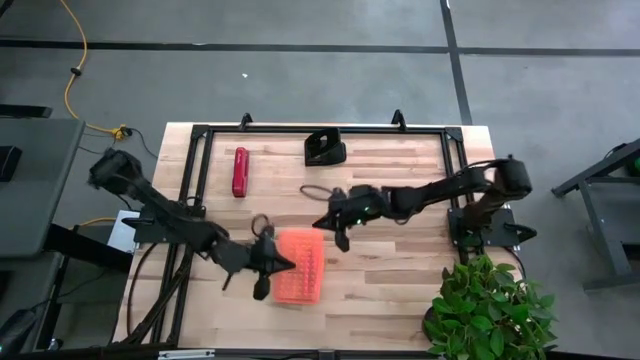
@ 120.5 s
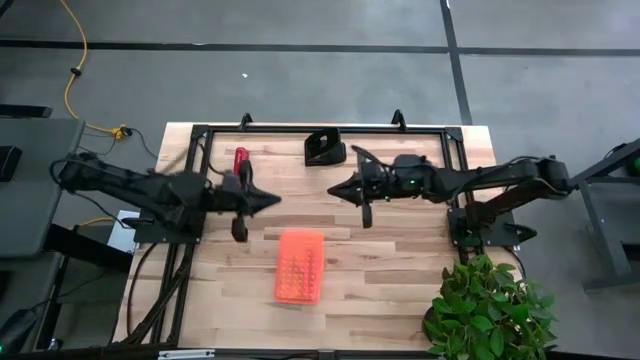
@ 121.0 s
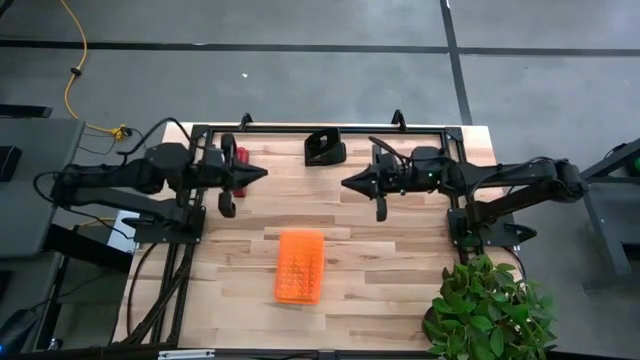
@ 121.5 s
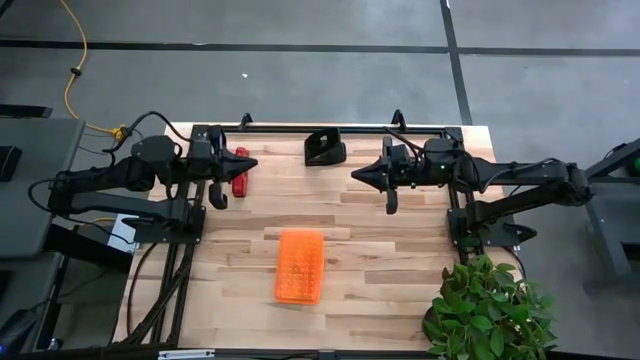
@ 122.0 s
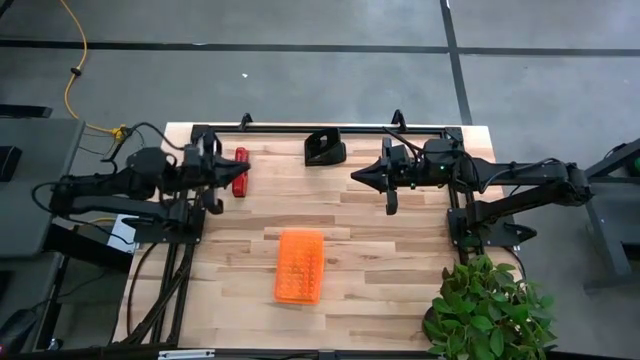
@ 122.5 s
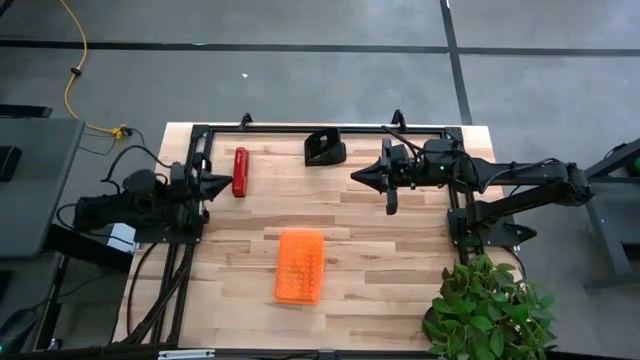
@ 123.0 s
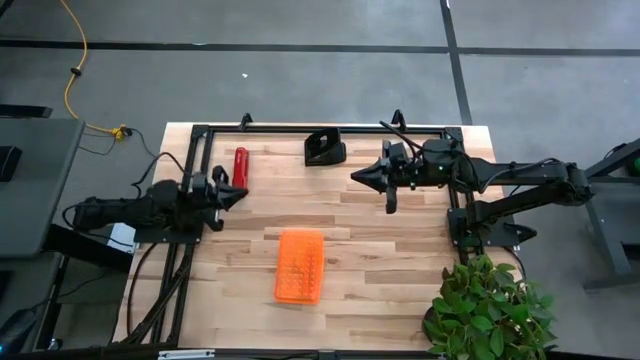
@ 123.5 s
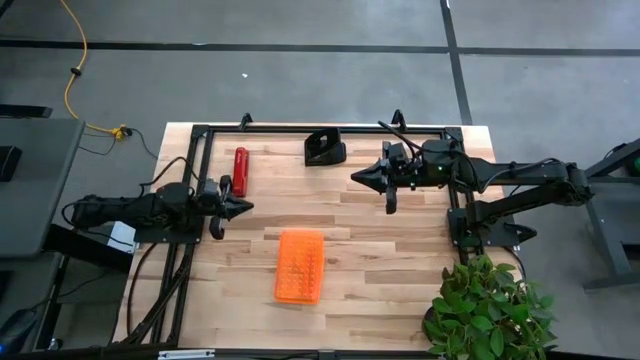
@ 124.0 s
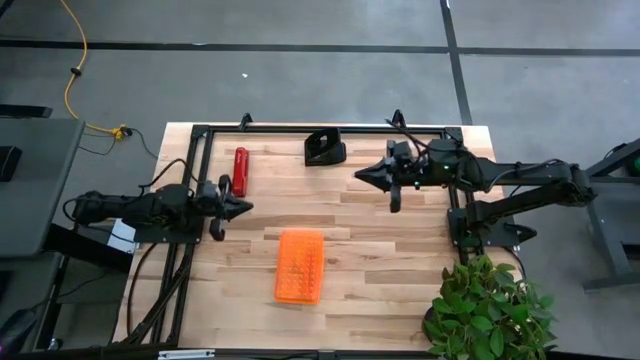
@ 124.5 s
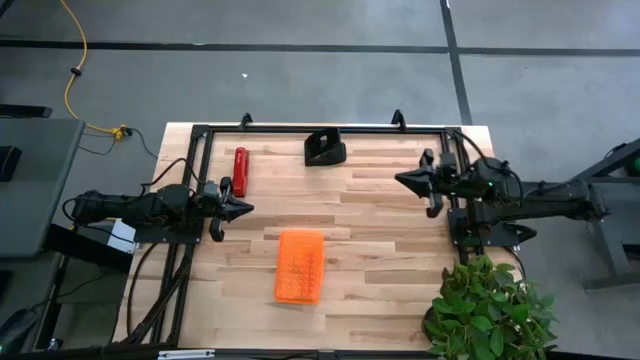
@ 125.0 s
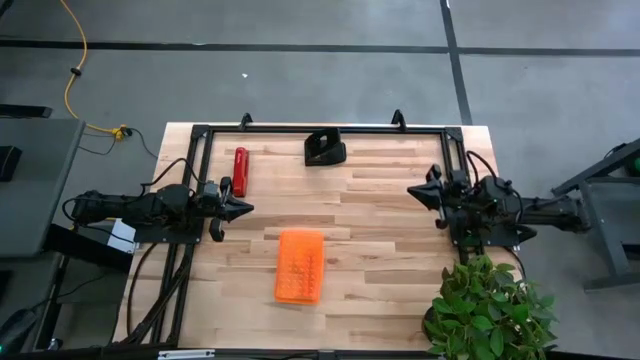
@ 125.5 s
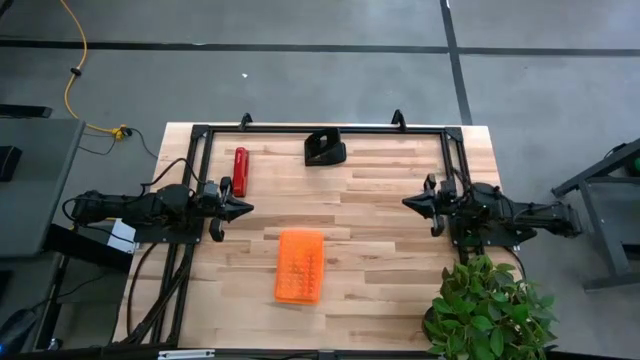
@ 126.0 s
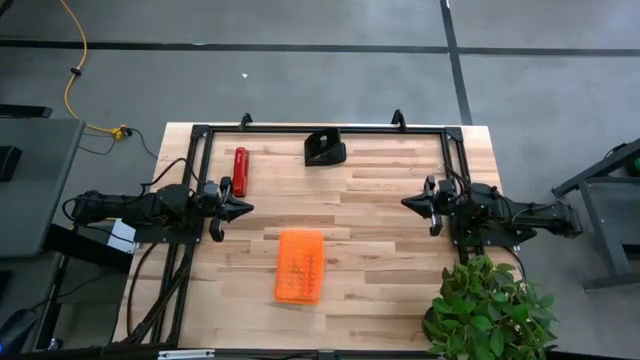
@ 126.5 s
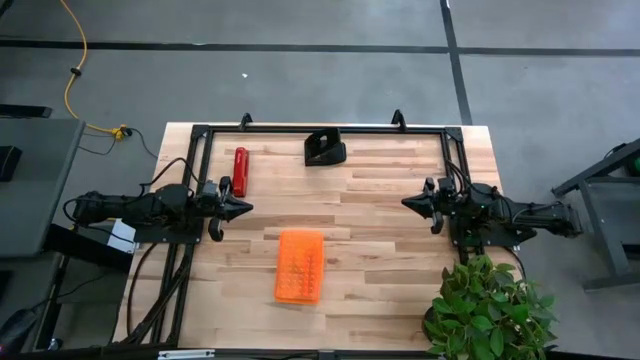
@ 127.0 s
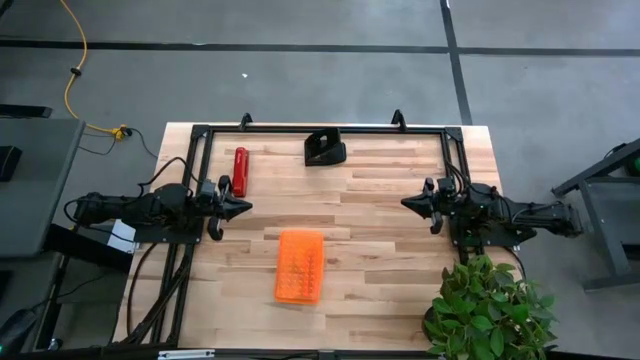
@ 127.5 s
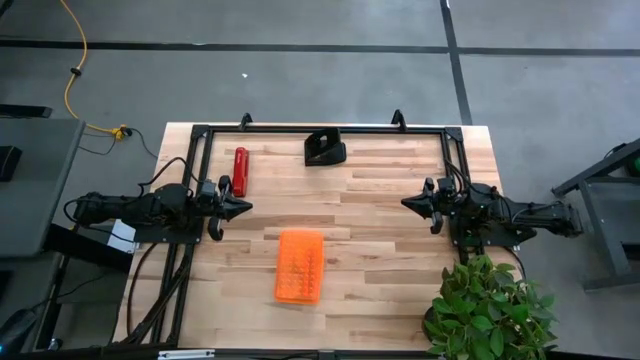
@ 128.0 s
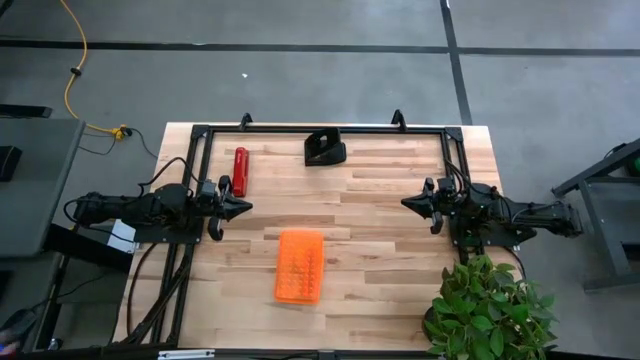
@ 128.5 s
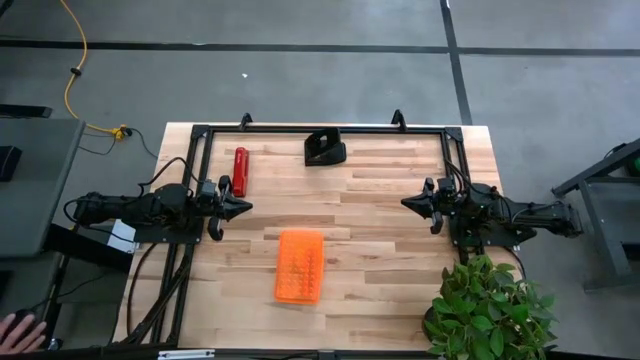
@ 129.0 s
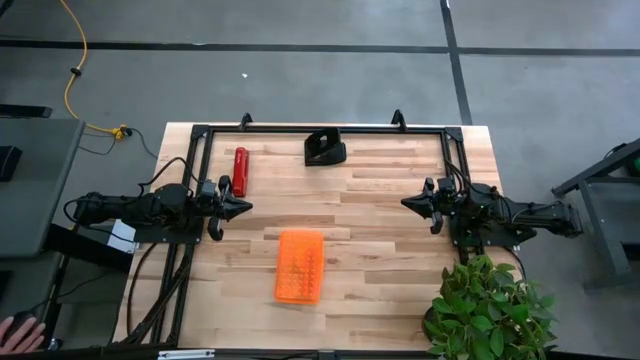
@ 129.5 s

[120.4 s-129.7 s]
Task: Pack school essentials
Return to Home Position

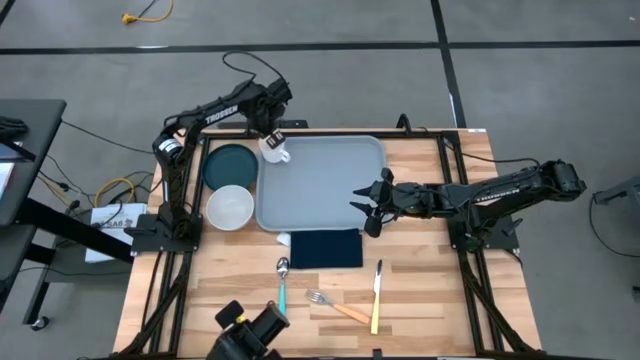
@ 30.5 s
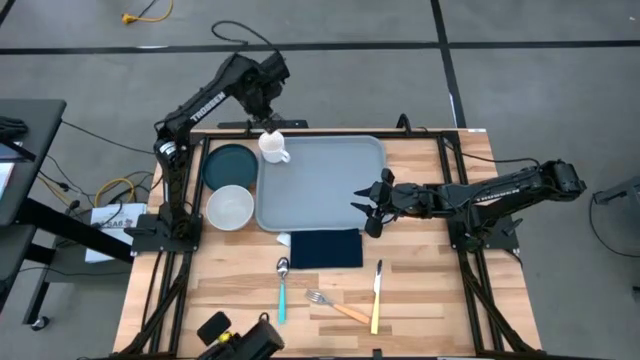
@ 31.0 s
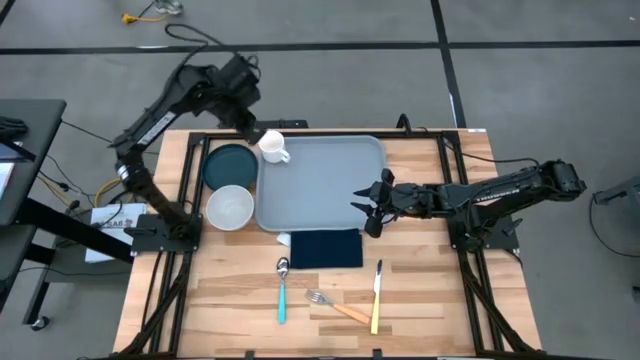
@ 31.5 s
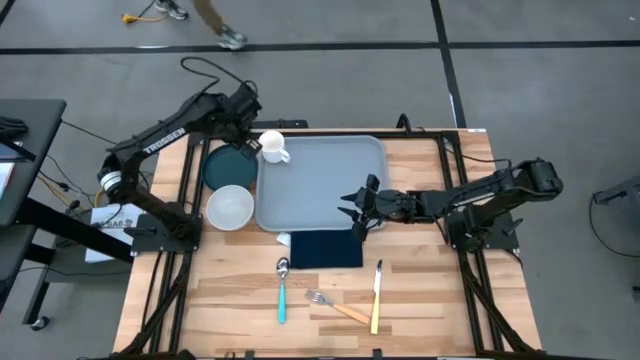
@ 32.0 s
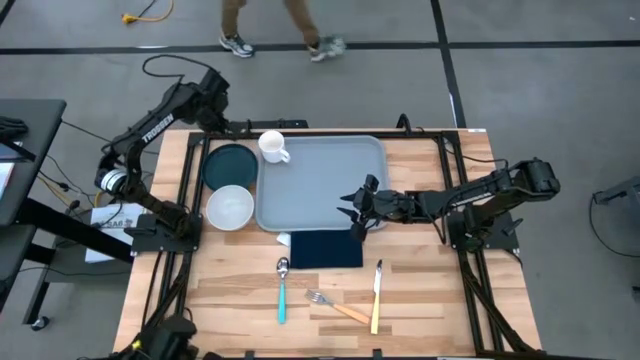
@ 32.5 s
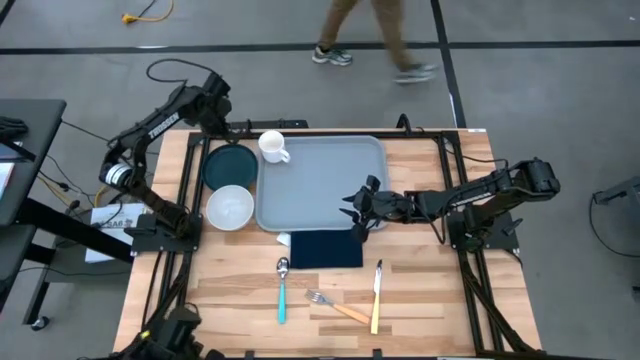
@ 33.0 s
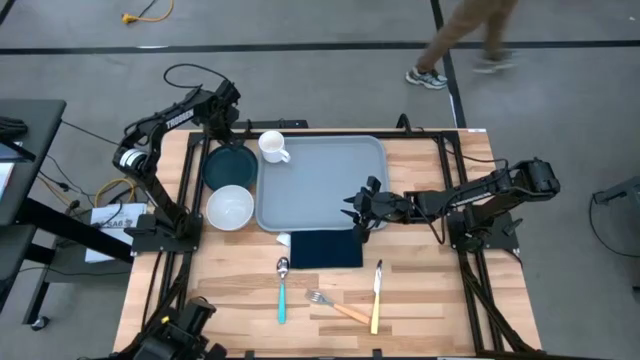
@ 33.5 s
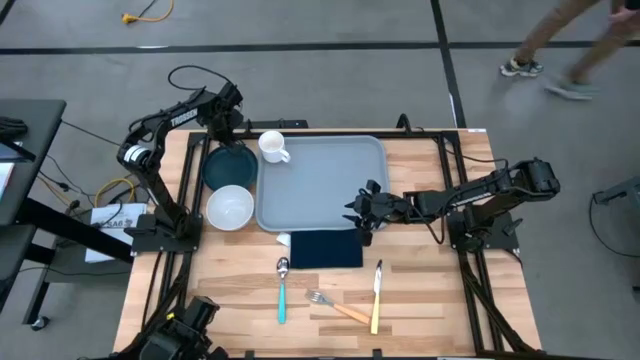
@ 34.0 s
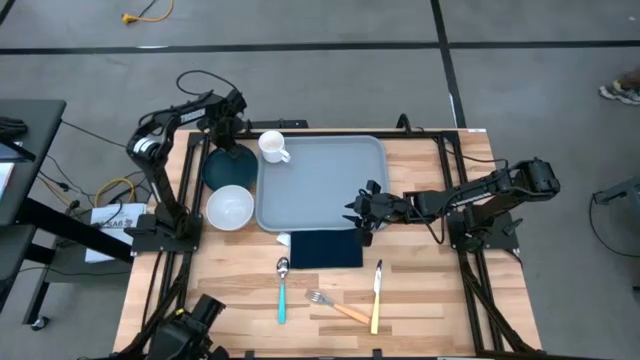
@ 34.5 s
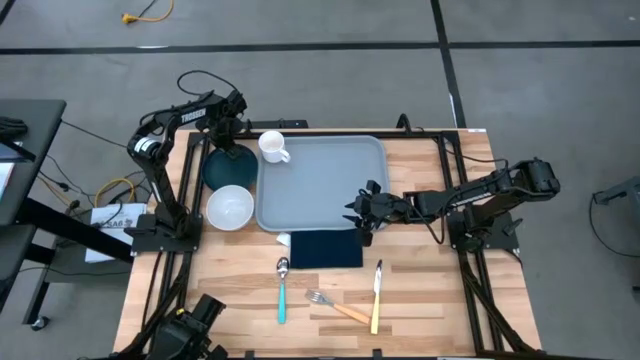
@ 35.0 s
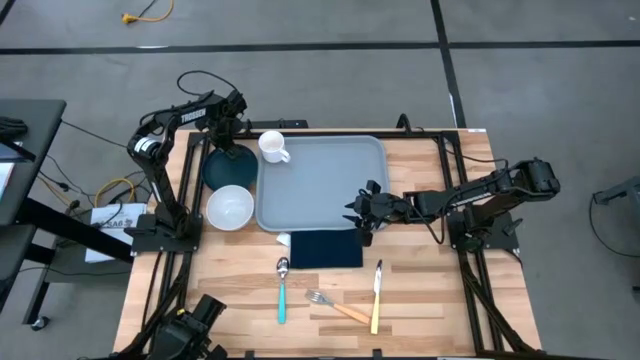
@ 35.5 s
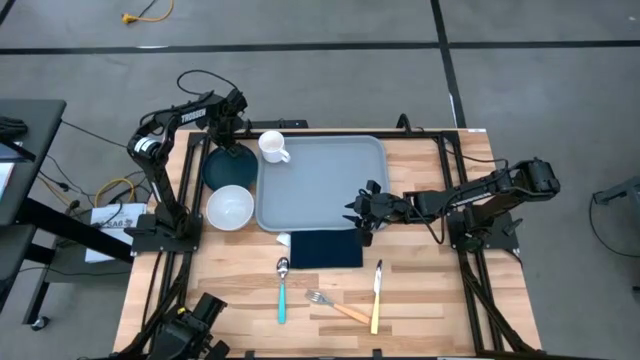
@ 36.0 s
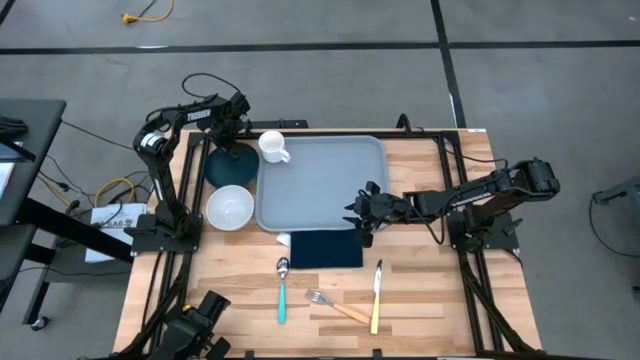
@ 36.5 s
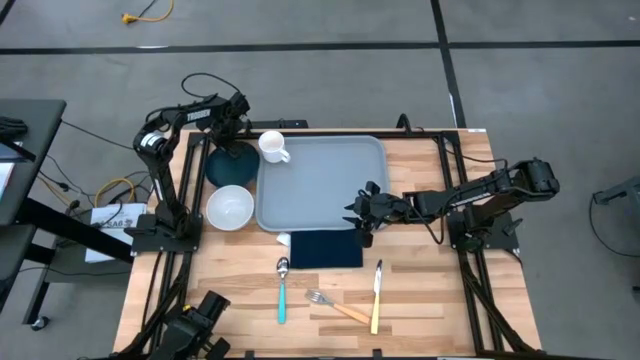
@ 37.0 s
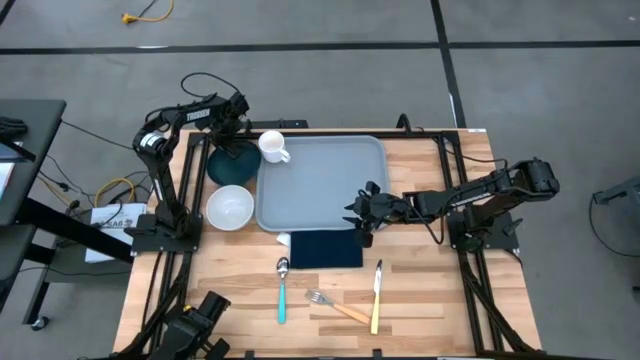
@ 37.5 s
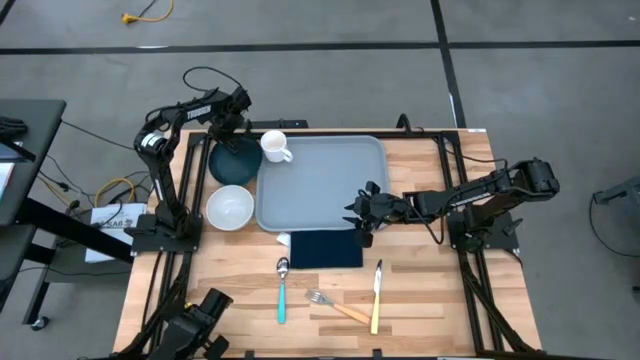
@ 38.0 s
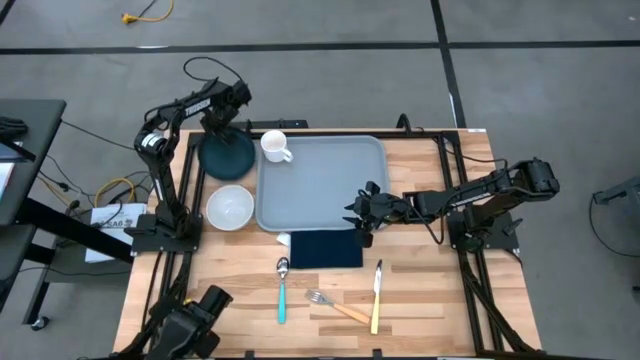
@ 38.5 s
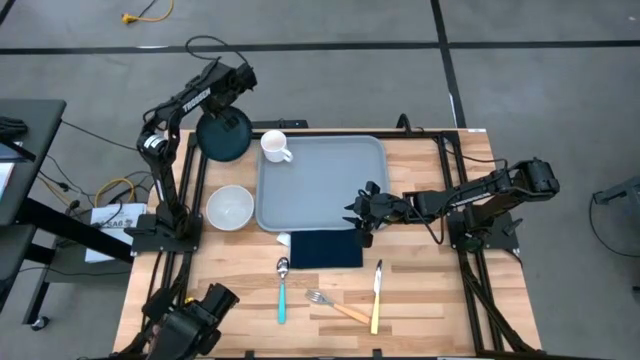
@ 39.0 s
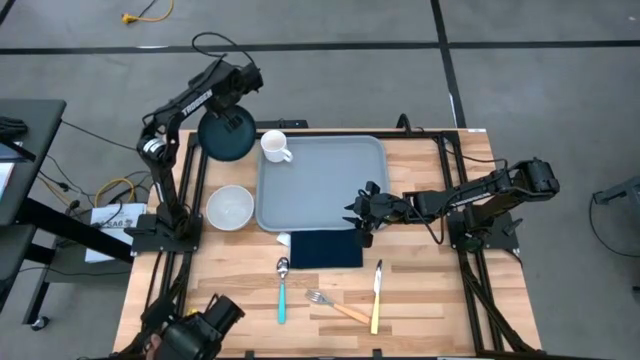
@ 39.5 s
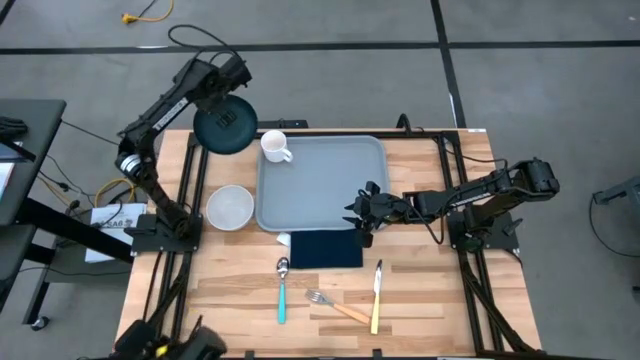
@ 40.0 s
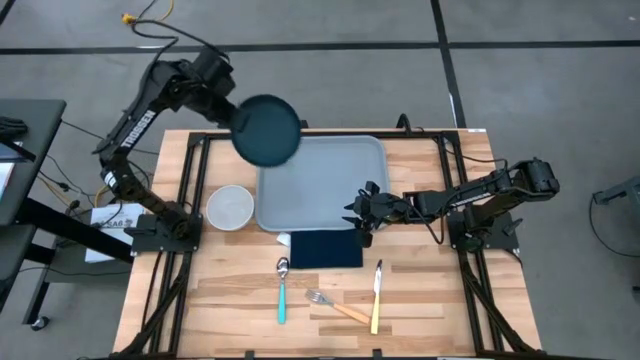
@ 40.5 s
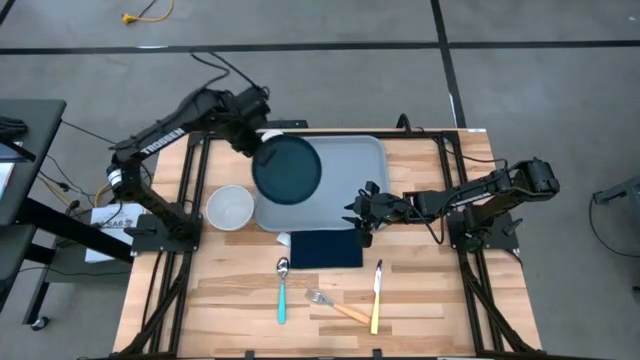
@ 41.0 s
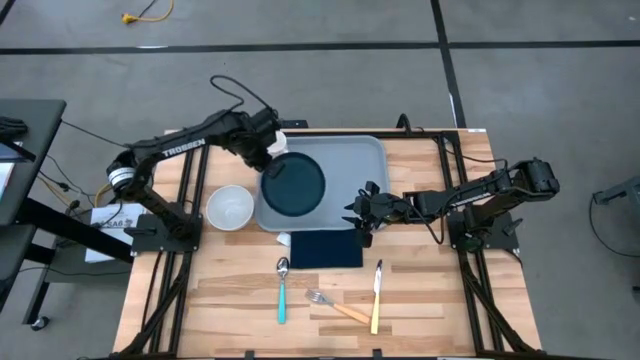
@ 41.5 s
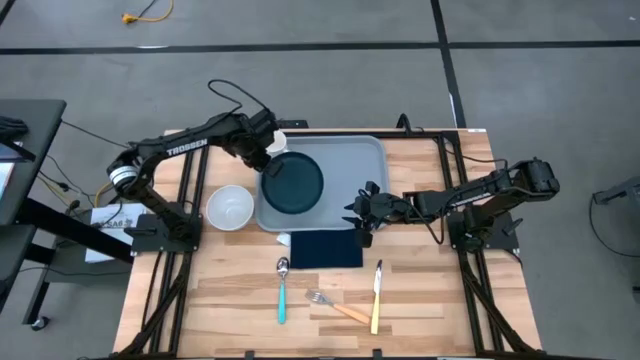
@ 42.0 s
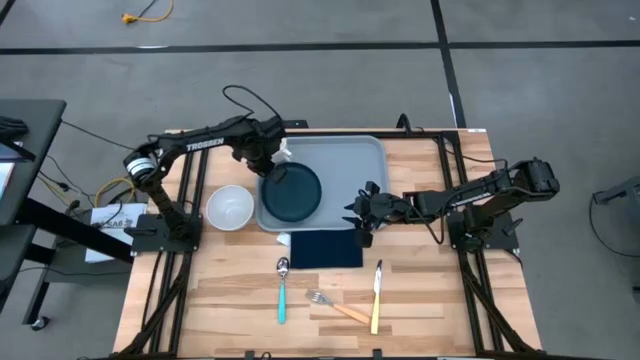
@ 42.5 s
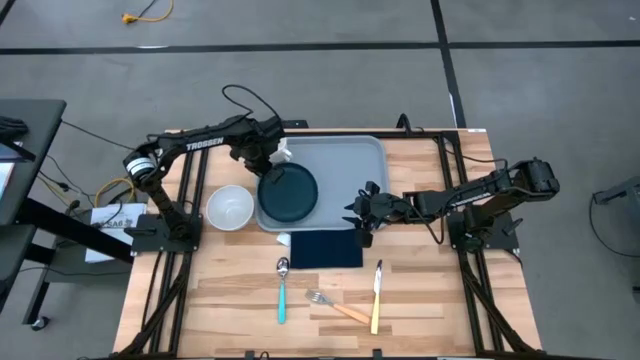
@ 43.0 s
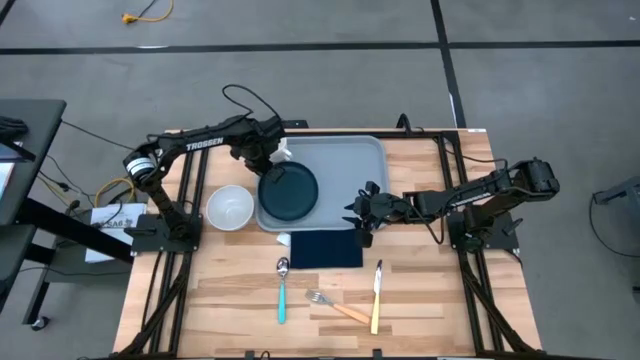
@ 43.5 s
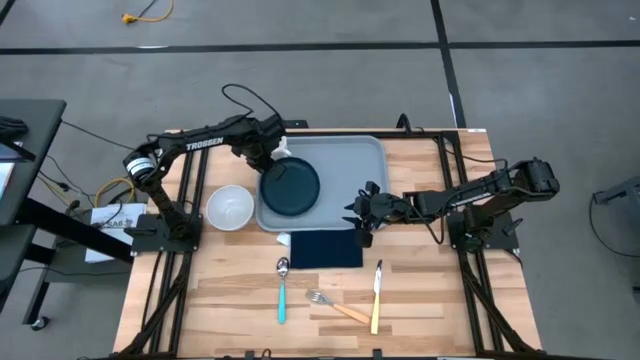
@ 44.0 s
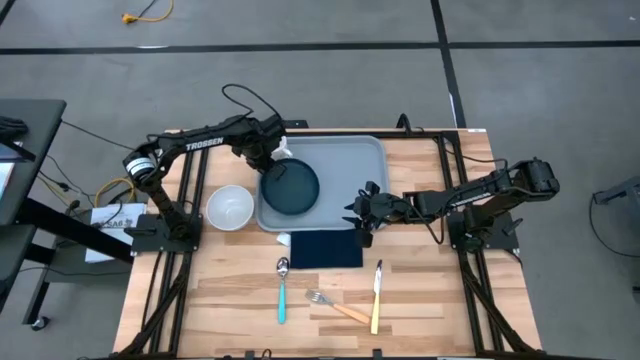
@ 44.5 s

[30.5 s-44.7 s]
Task: Set up tray
Put the black plate on the gray serving tray to the bottom of the white cup
